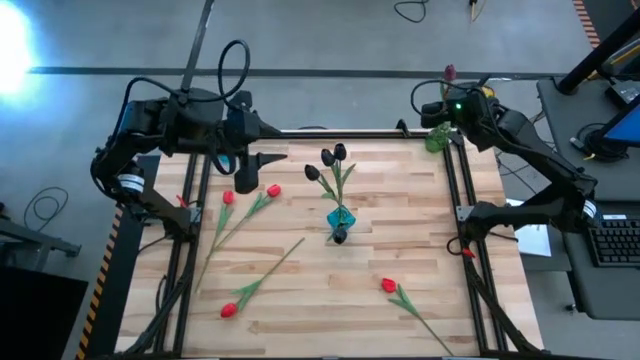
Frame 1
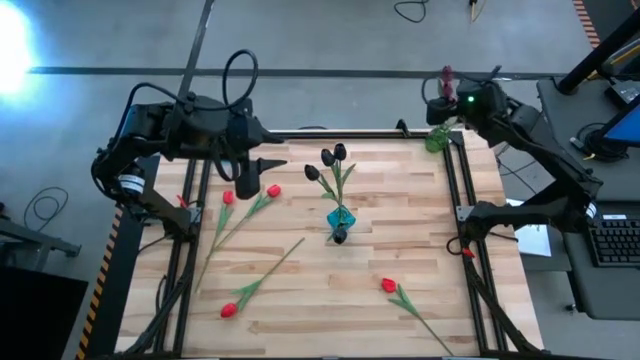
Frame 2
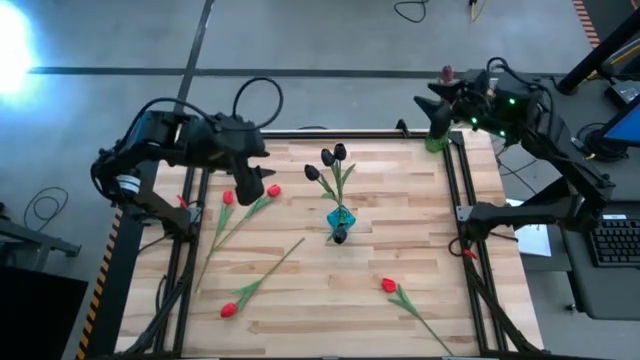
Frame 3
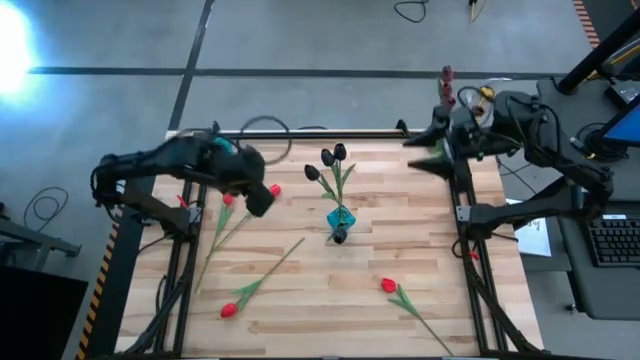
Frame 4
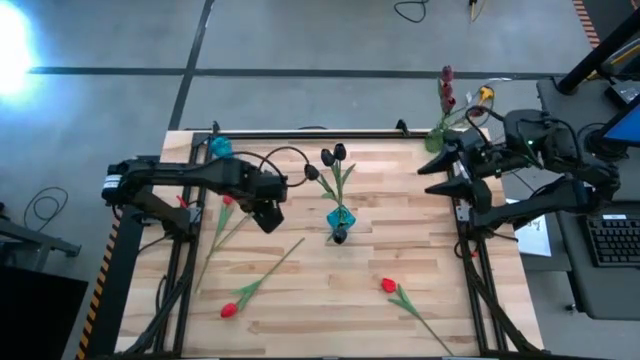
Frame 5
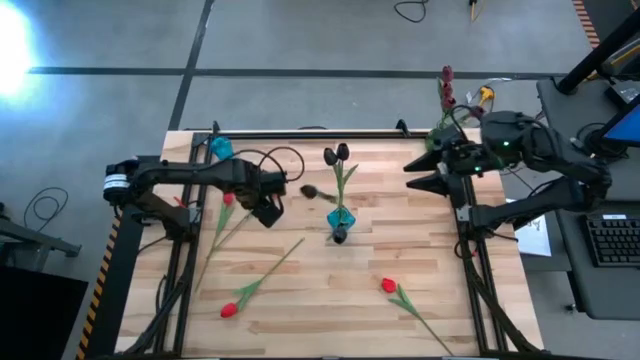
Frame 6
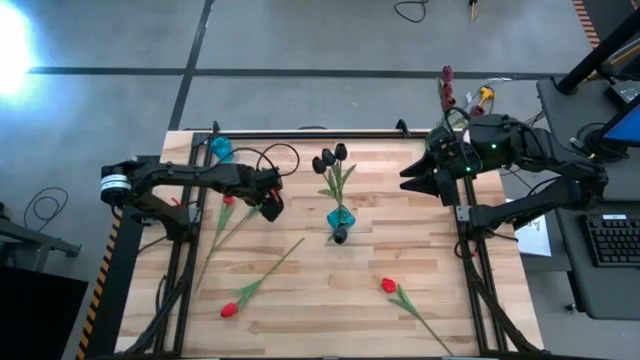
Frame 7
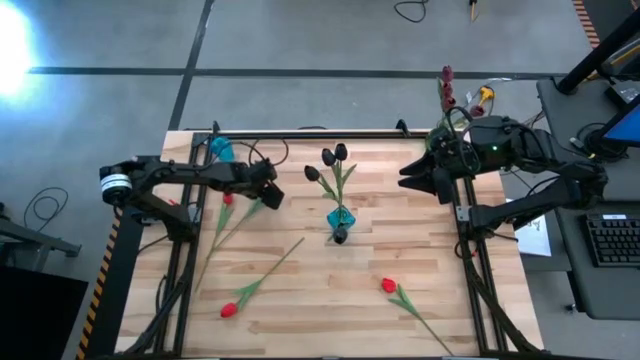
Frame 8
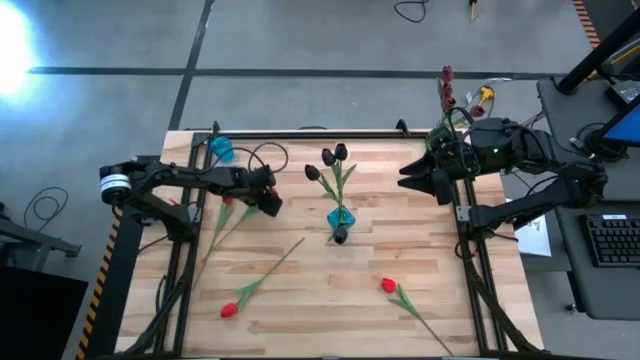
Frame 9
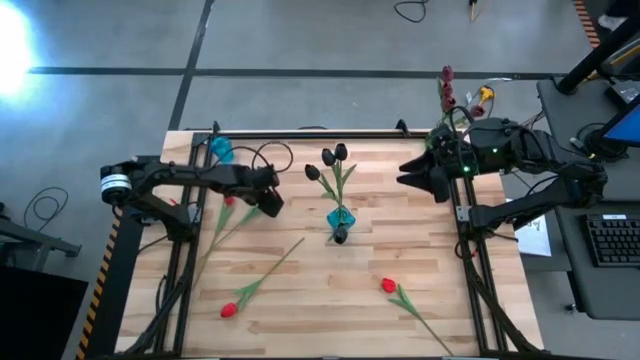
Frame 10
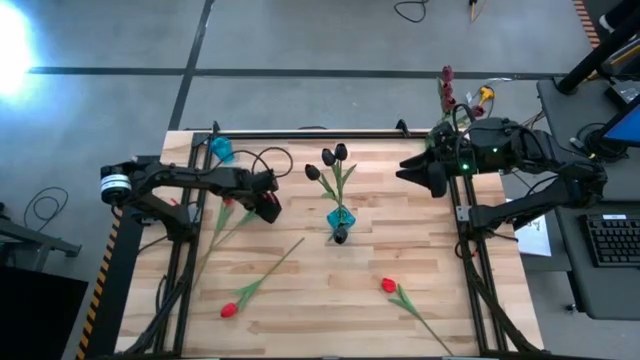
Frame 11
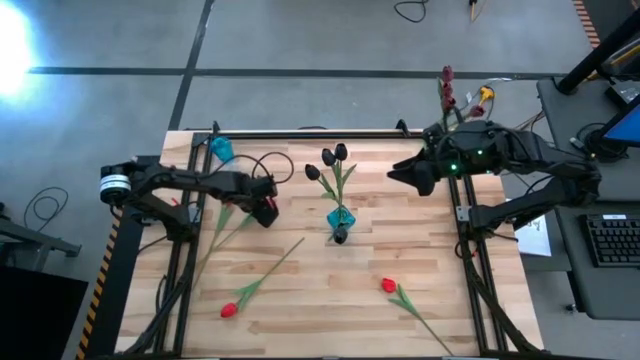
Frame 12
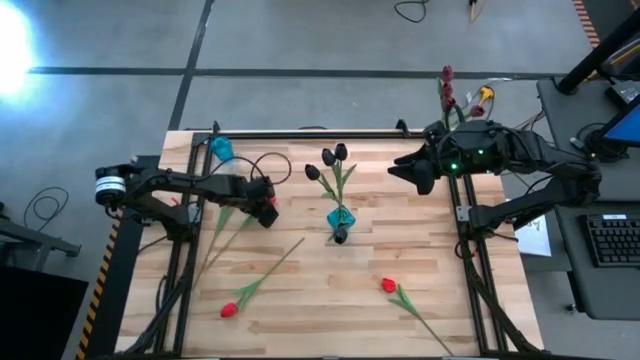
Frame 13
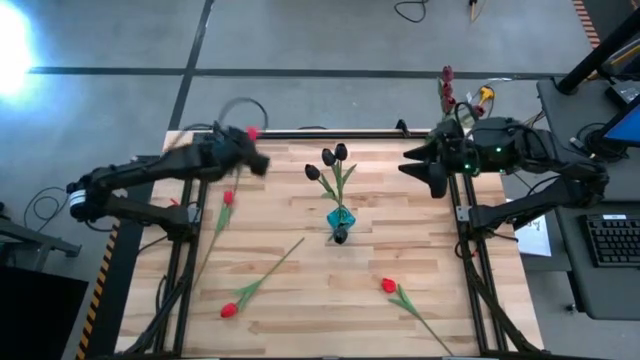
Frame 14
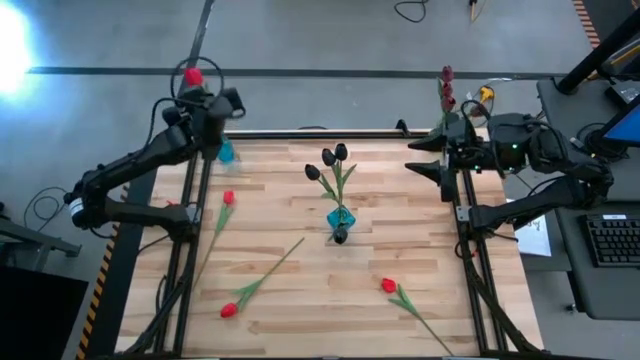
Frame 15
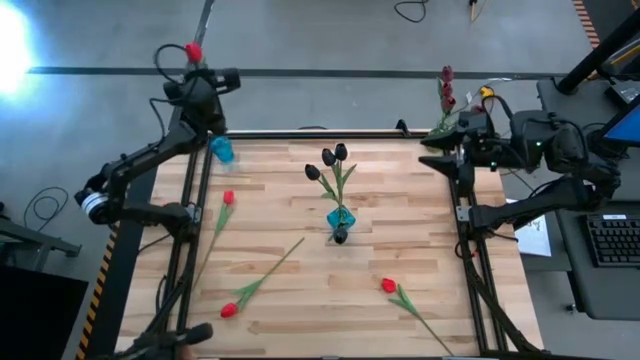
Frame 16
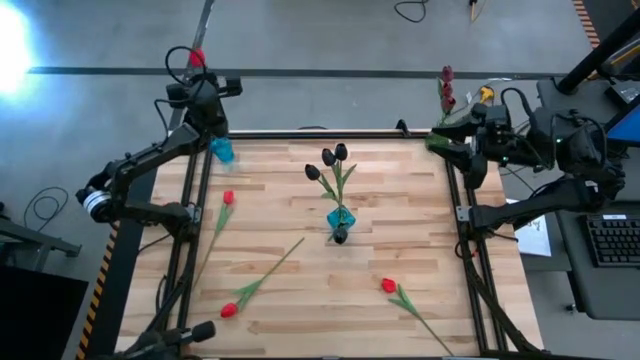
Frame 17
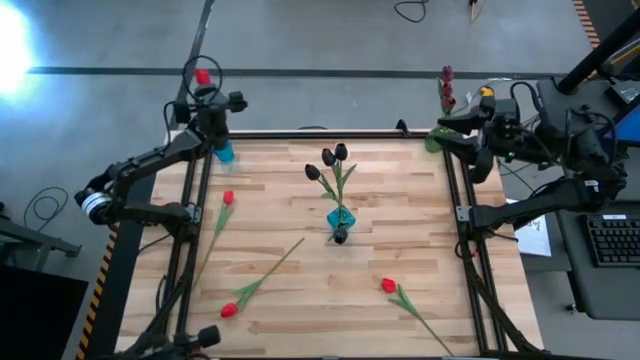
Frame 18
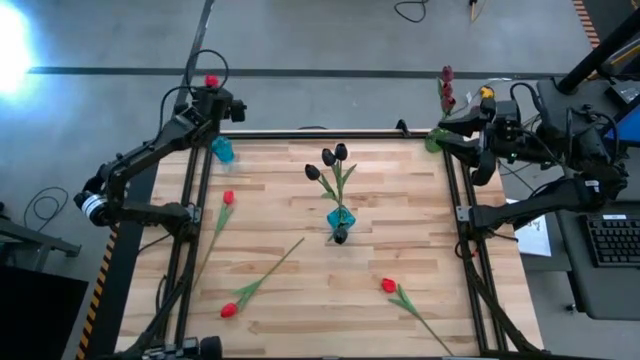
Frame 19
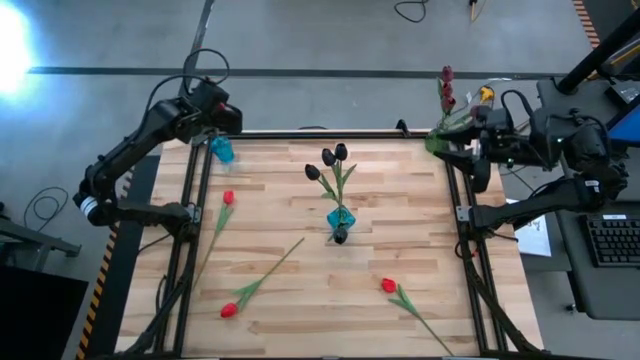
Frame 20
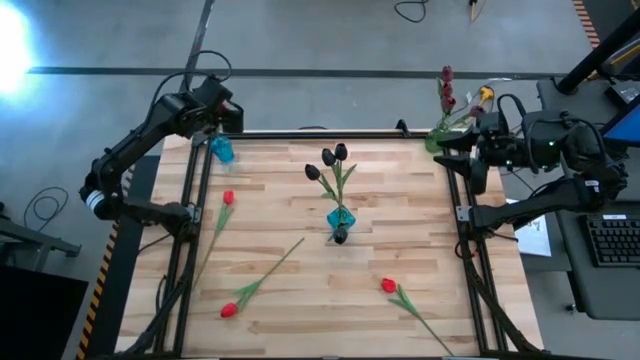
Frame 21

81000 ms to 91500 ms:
Task: Sort flowers into vase by color
Put the red flower into the left blue vase

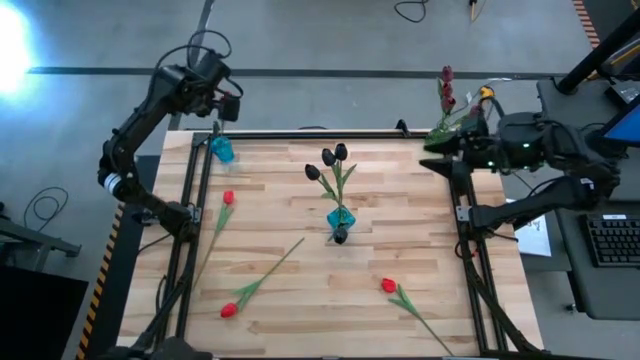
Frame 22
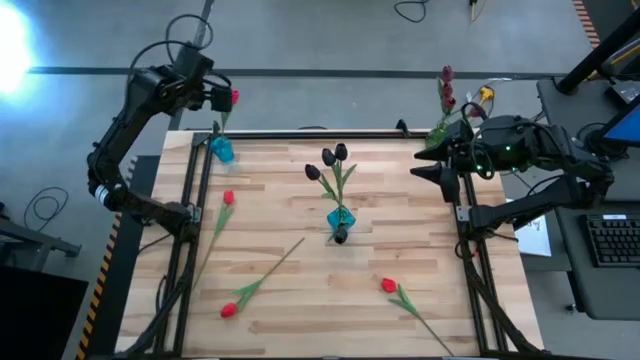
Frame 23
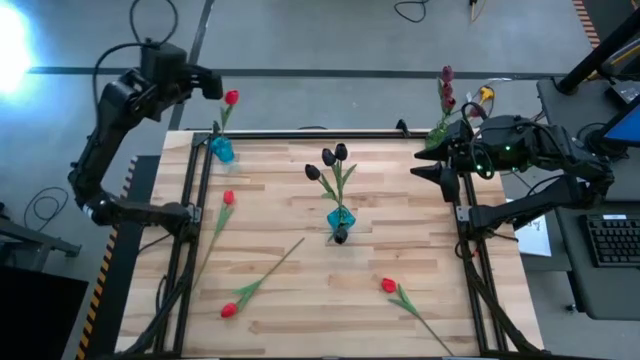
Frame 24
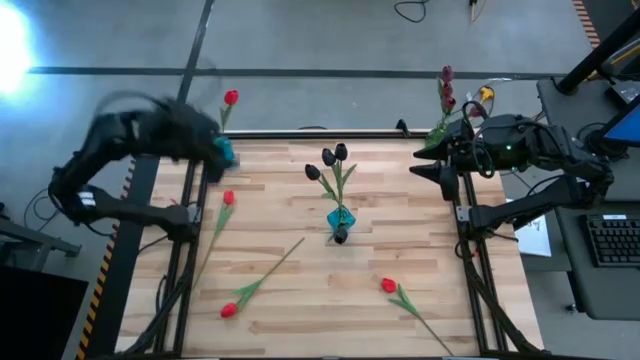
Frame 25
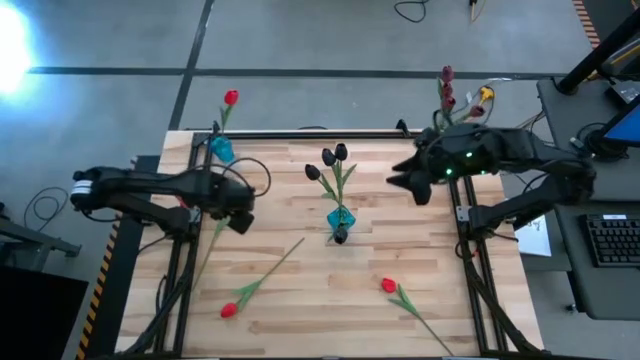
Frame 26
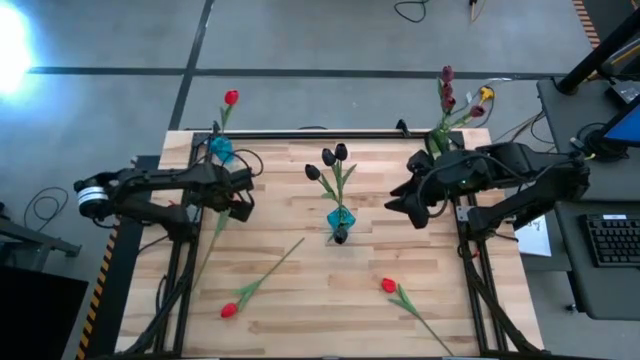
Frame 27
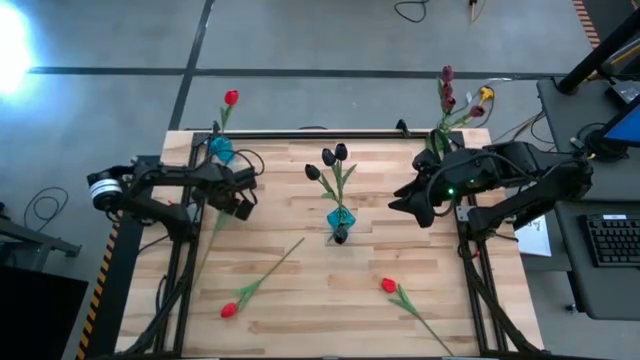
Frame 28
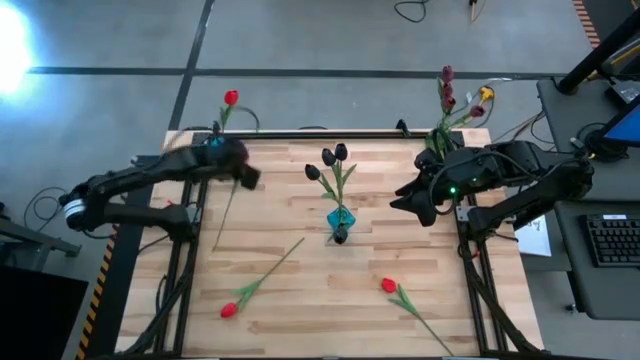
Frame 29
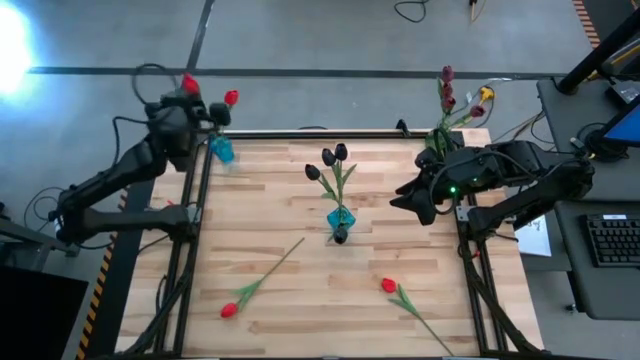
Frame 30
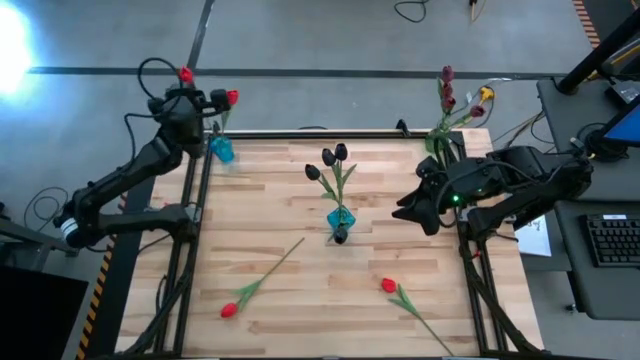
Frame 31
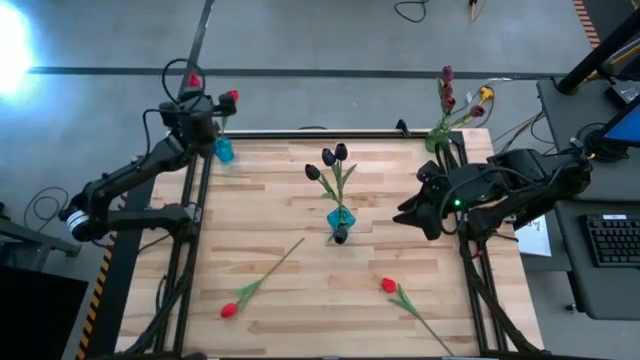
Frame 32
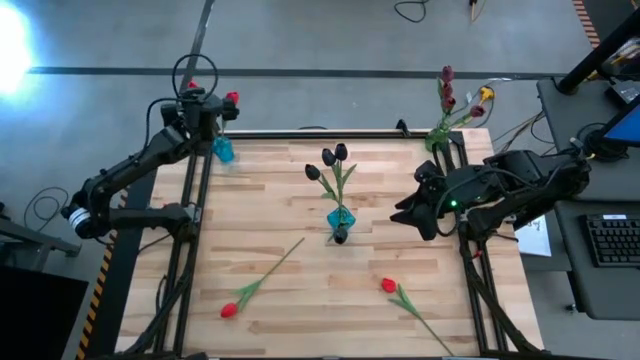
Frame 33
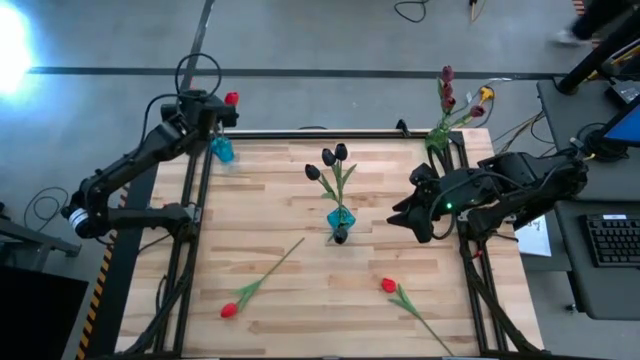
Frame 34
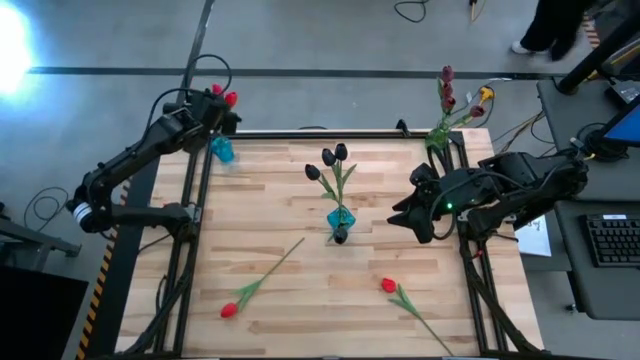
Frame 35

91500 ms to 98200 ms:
Put the red flower into the left blue vase

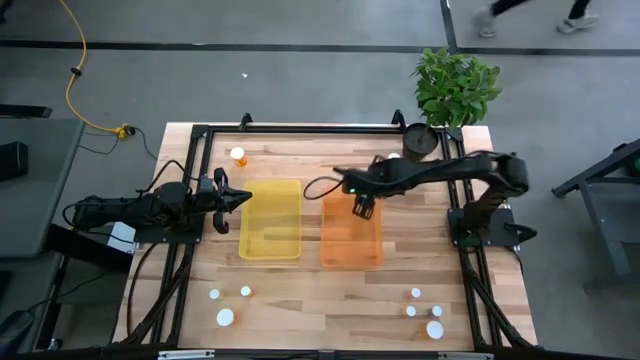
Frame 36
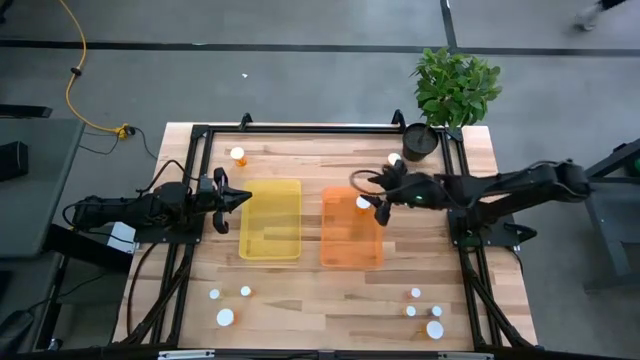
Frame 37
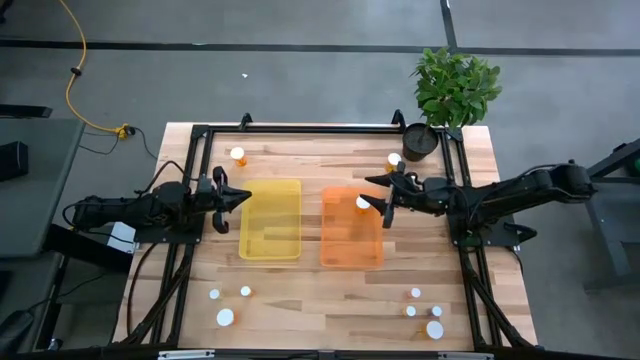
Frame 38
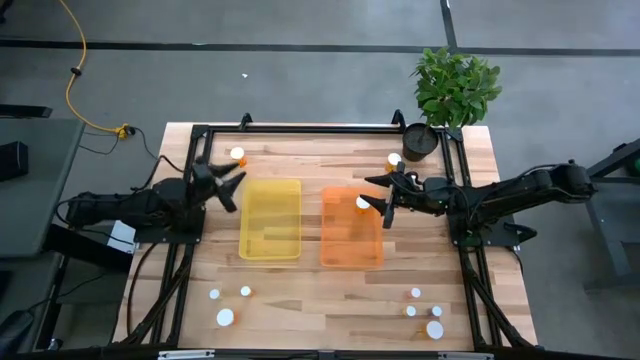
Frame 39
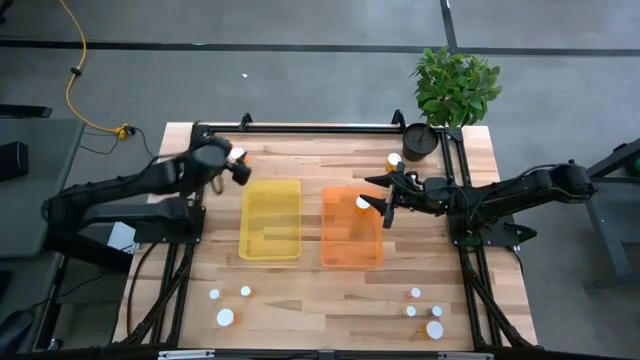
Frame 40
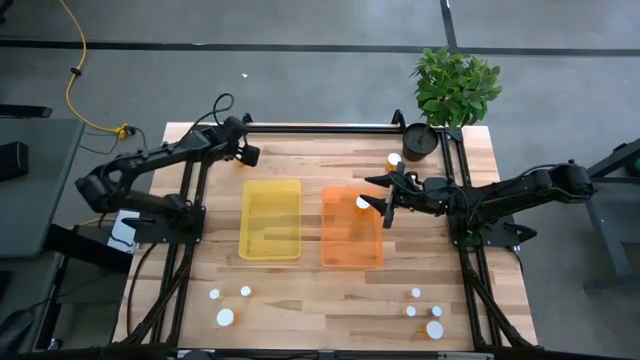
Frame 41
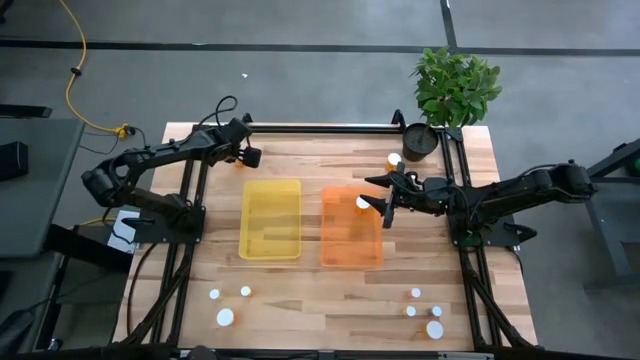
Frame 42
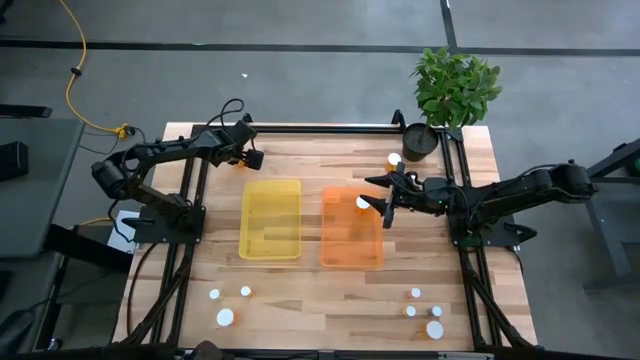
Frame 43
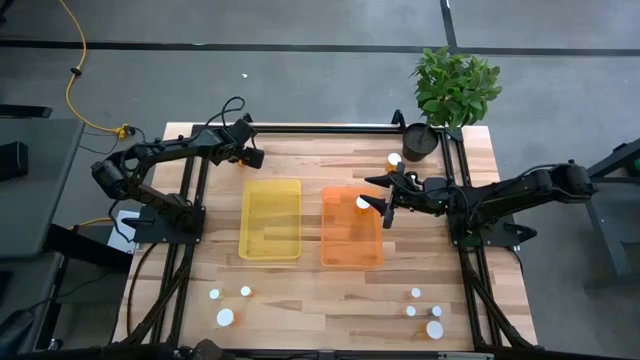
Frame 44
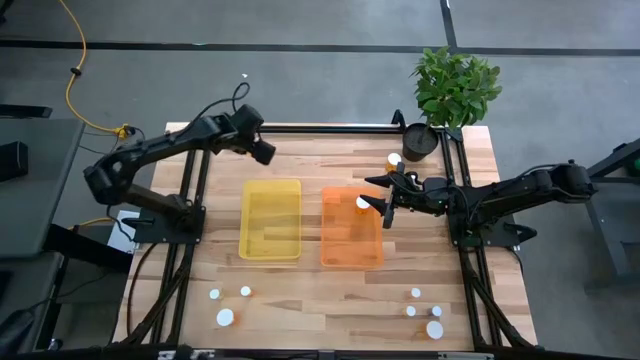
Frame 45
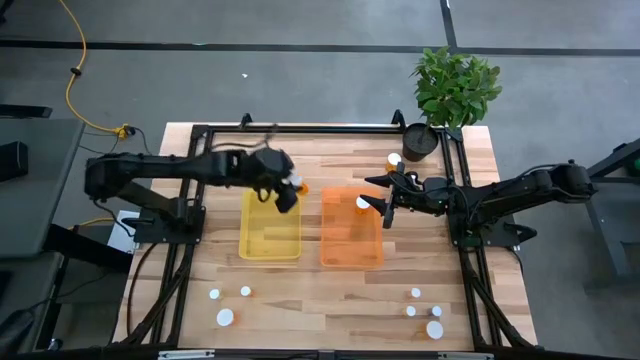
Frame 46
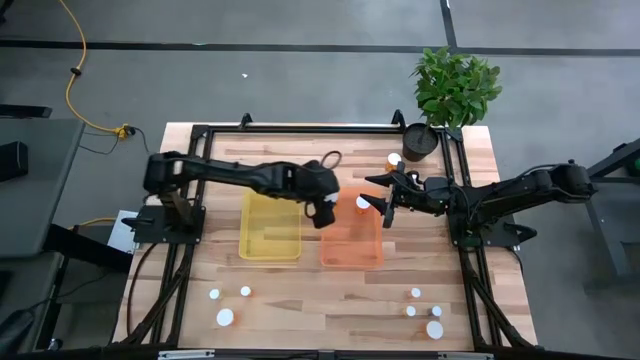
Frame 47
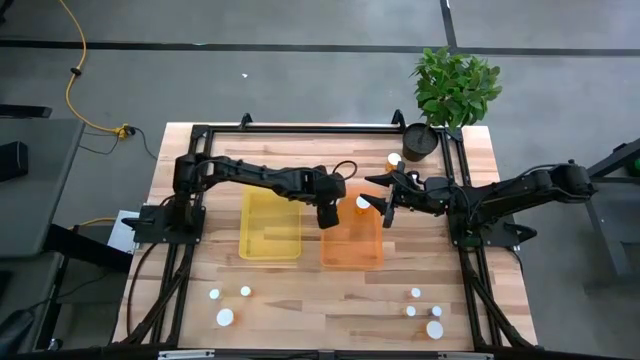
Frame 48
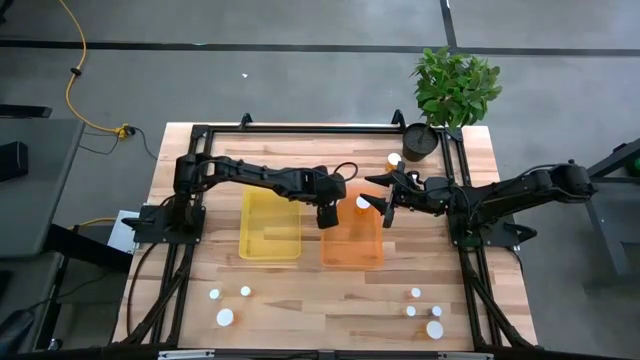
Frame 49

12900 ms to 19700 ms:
Task: Pick and place medicine bottles into bin by pill shape (circle, oval)
Put the orange capsule bottle into the orange bin
